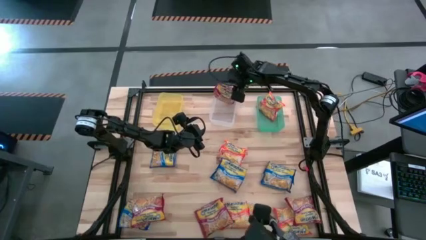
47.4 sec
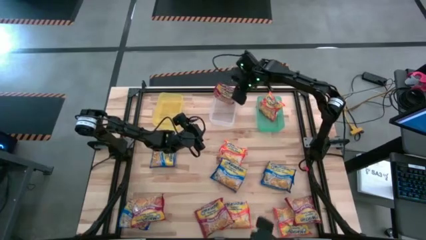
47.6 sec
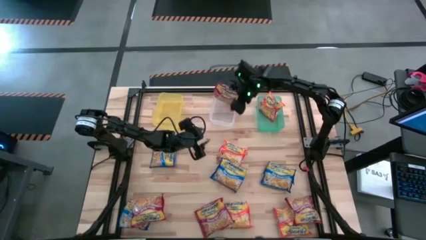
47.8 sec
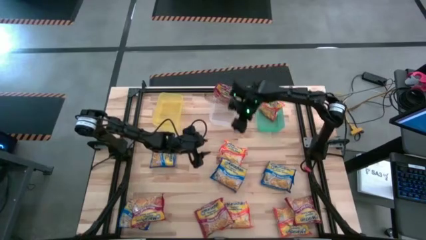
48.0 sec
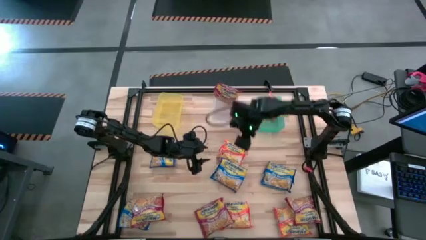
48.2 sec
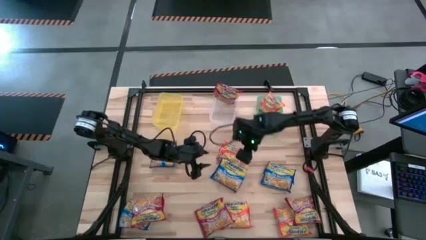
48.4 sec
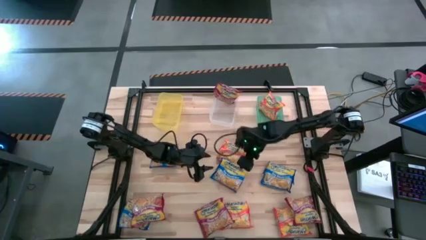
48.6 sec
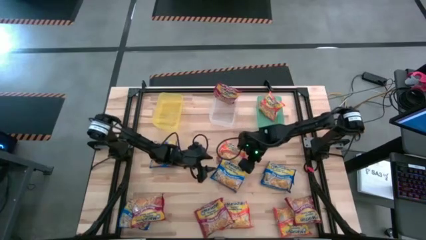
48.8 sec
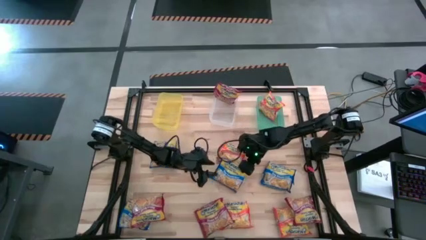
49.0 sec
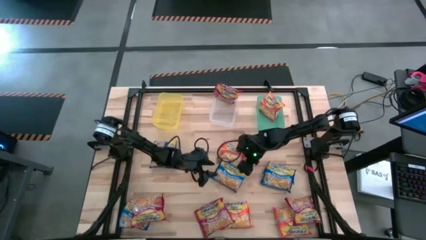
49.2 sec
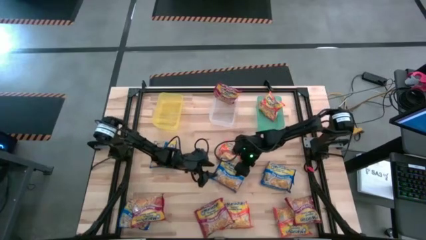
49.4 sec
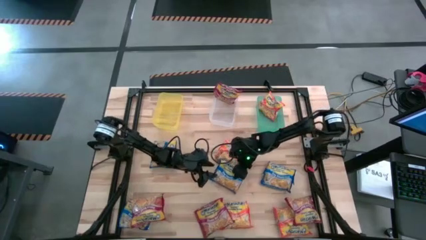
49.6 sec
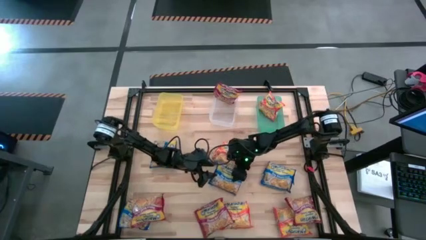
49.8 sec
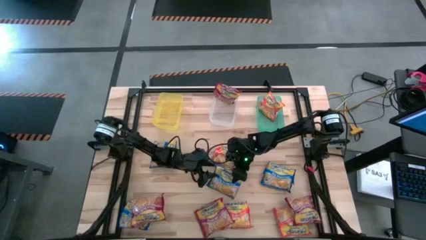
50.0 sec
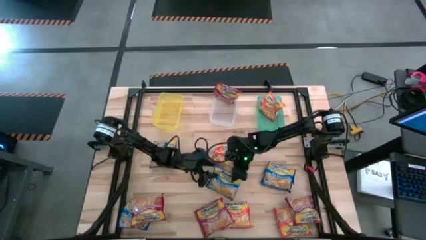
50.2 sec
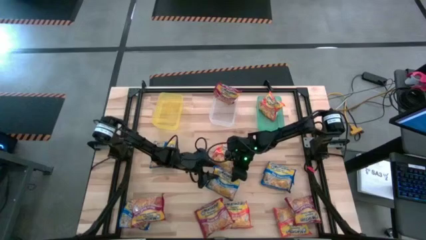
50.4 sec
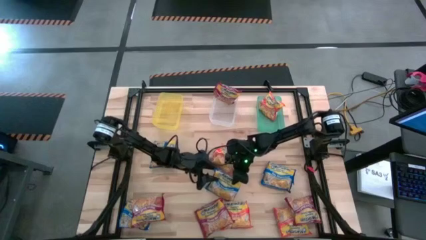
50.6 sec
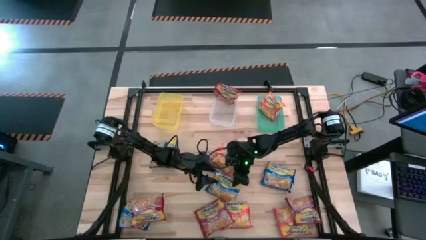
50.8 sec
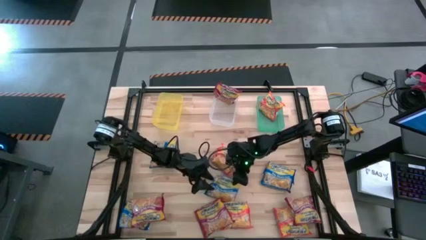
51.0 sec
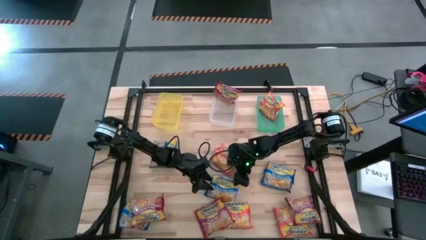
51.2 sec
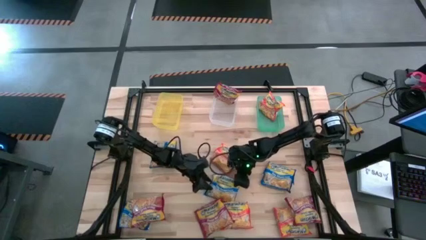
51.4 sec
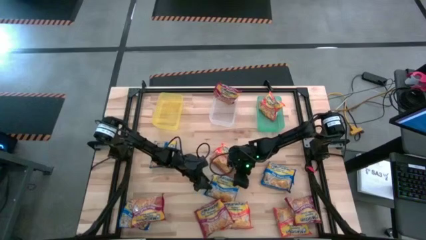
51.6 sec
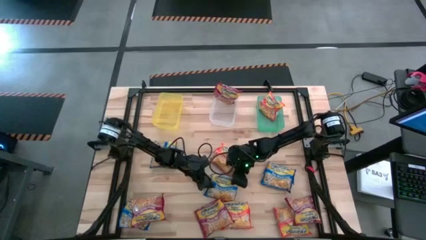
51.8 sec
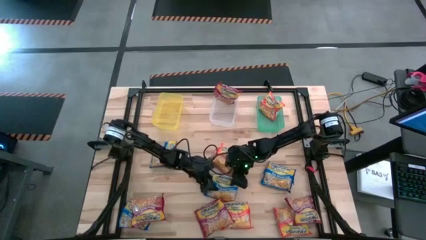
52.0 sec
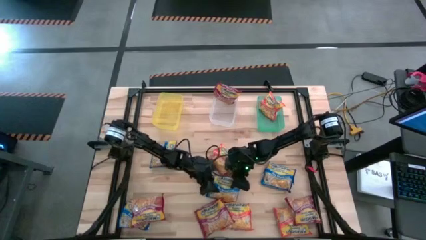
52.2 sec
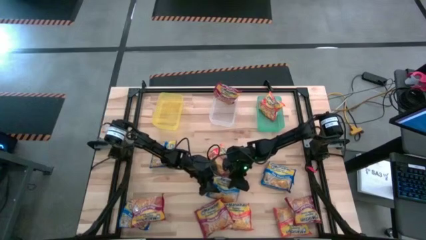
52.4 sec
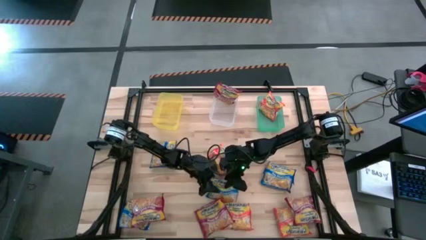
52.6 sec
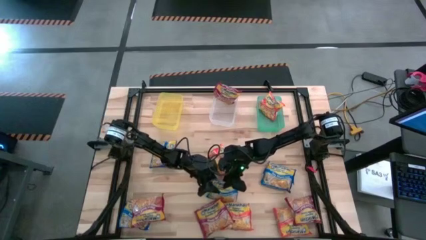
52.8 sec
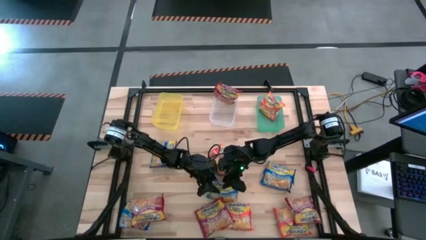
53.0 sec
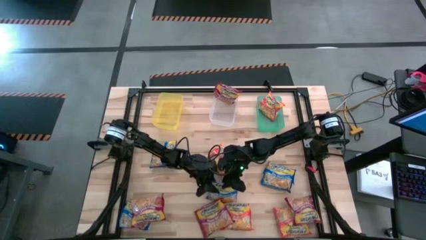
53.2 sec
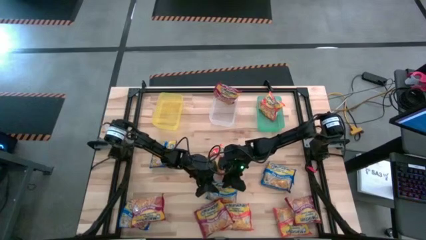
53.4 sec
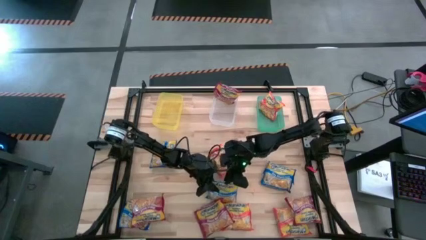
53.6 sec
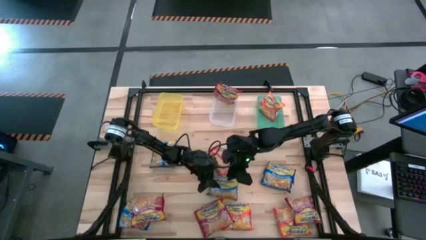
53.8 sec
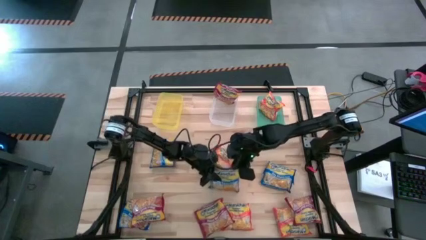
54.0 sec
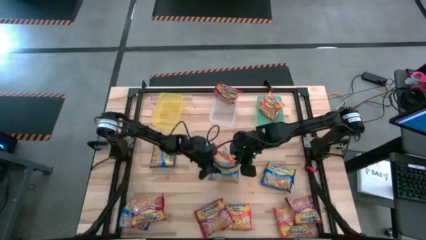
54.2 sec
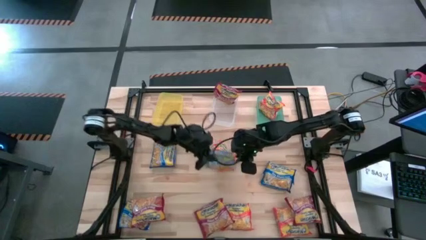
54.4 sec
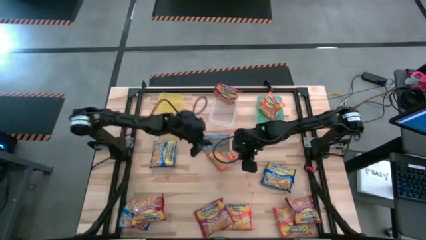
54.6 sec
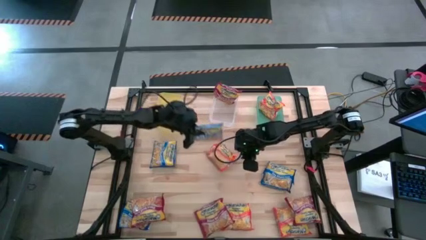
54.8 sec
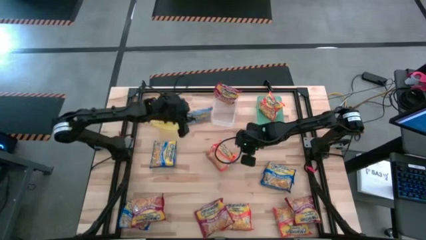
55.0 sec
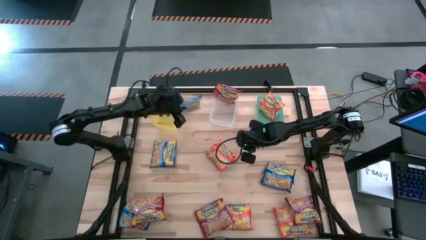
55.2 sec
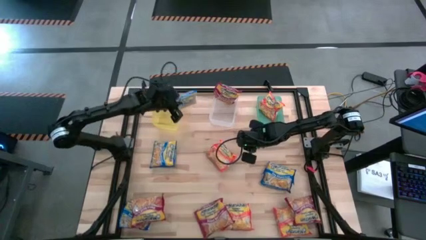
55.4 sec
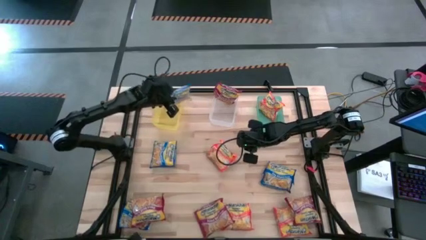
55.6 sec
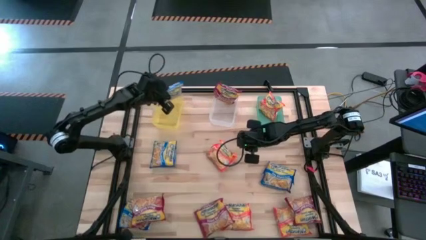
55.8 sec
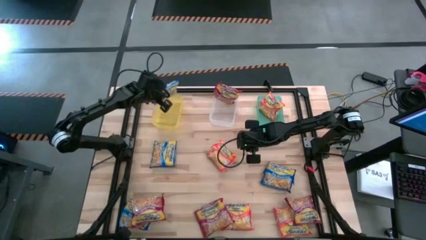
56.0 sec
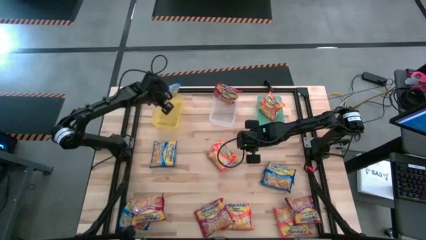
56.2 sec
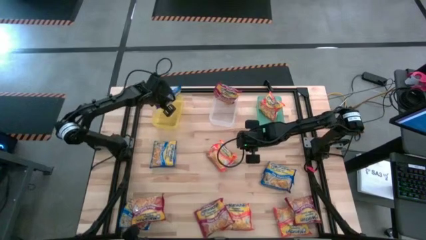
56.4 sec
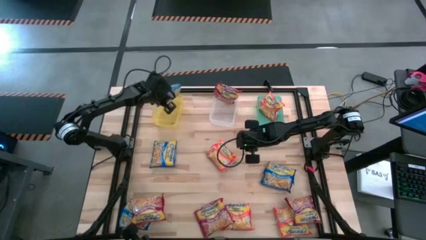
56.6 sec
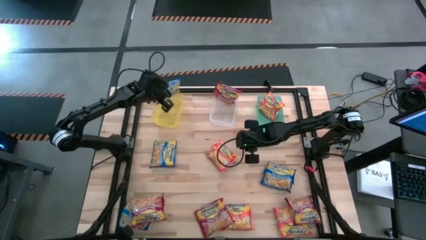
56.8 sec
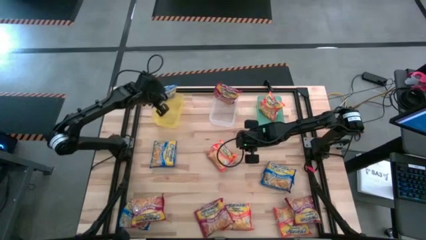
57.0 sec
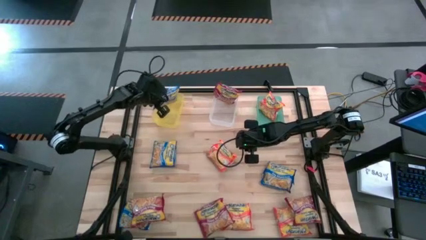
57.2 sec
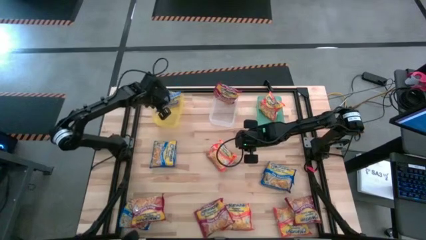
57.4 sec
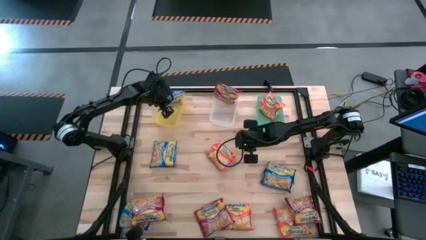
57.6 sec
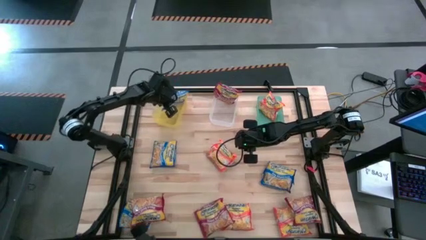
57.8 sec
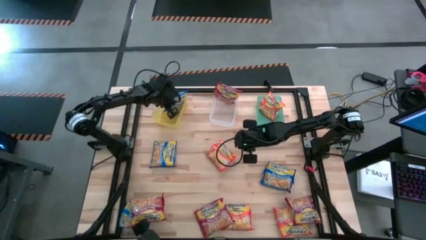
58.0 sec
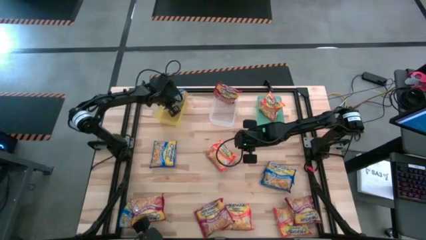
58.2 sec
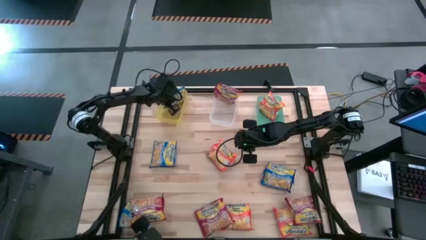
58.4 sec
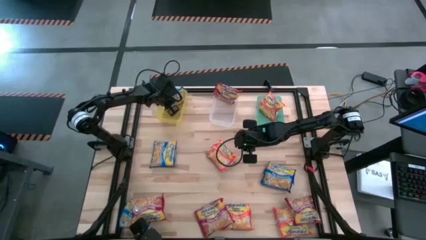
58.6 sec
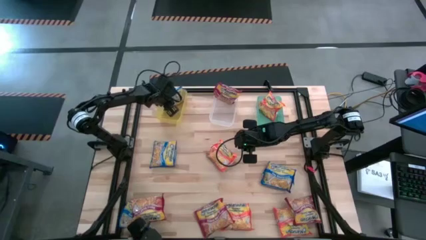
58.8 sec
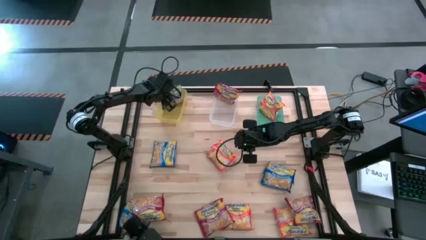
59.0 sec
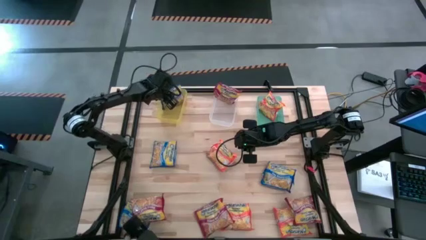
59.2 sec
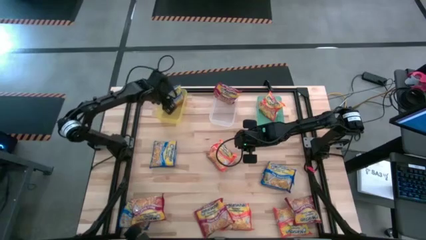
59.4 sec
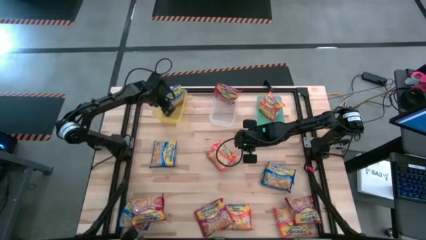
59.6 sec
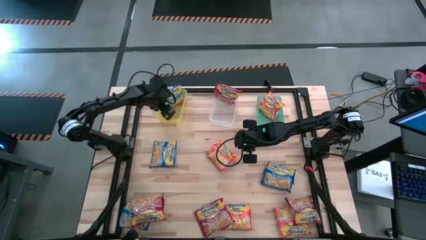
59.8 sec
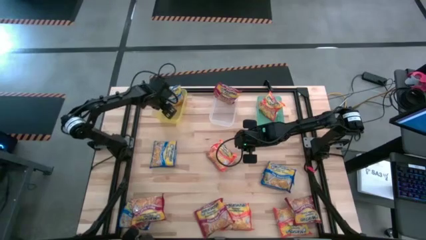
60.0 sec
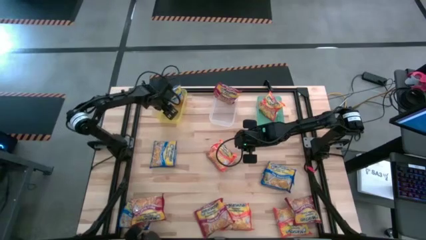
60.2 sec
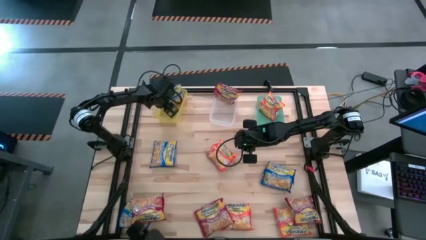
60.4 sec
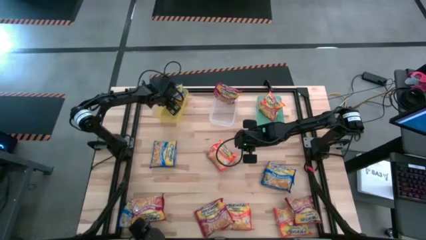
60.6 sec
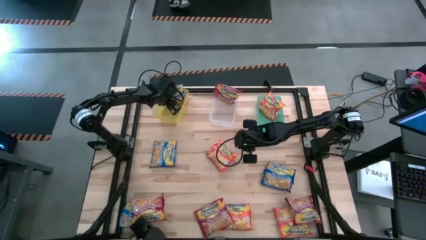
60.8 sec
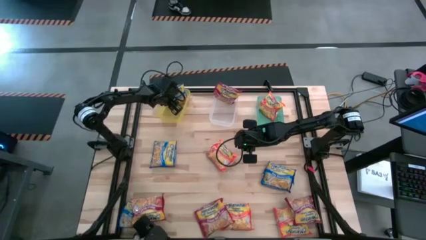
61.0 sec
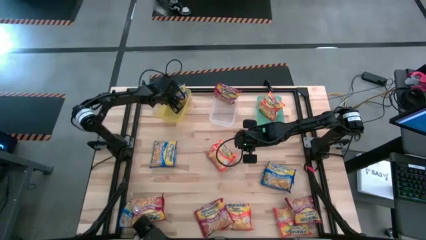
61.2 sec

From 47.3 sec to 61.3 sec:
Task: Sort Maruchan noodles
Put the middle blue noodle pack into the yellow bin

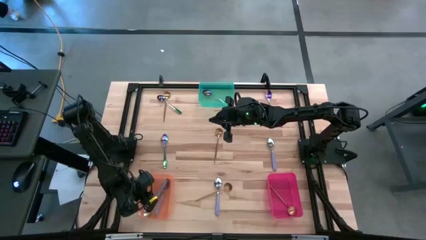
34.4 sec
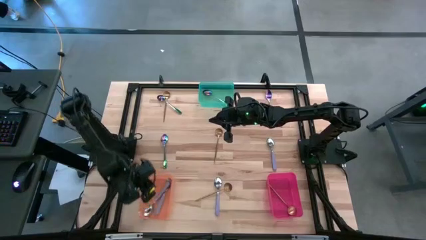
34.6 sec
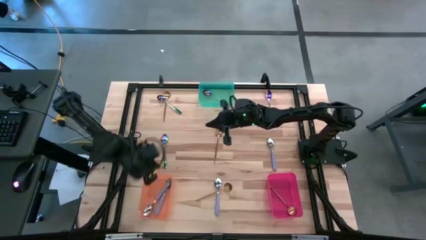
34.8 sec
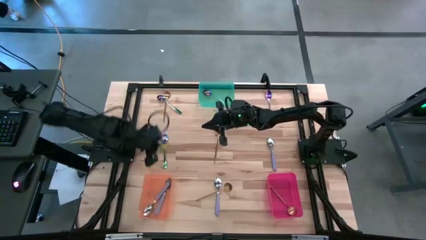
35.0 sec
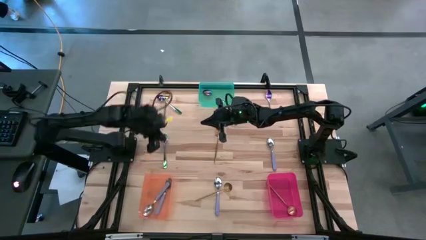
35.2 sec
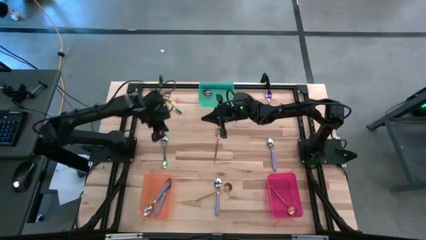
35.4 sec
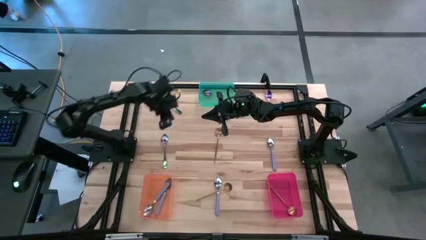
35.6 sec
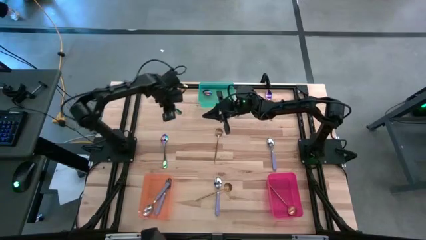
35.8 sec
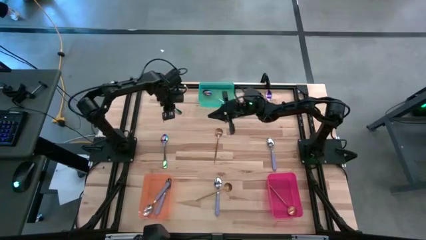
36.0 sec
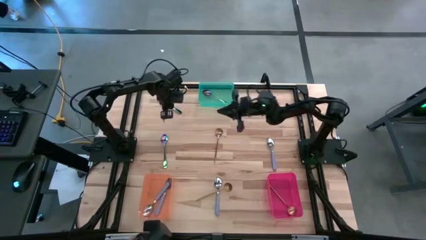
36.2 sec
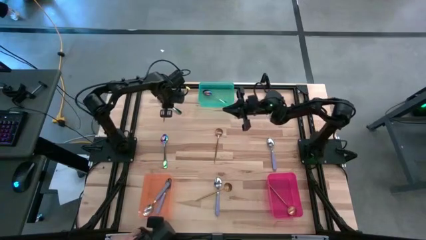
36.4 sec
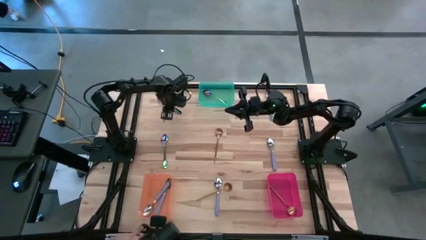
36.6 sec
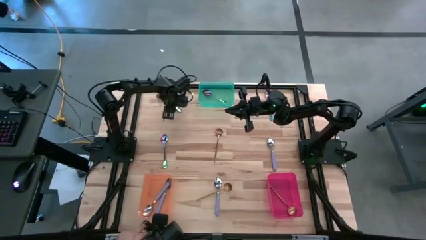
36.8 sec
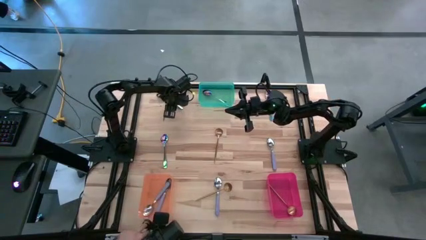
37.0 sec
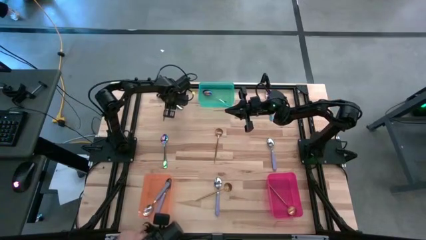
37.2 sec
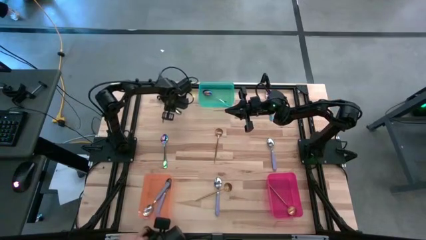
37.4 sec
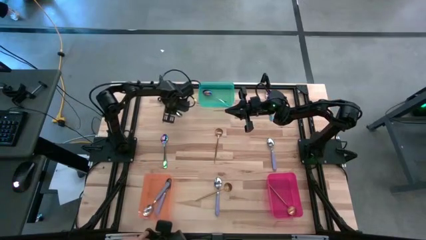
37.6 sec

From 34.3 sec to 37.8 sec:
Task: Sort silverware by color (type)
Put the violet spoon into the blue bin
